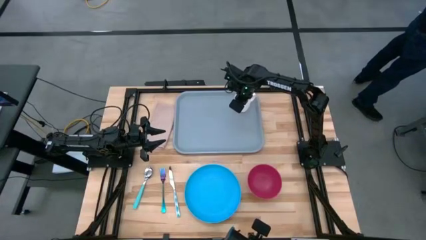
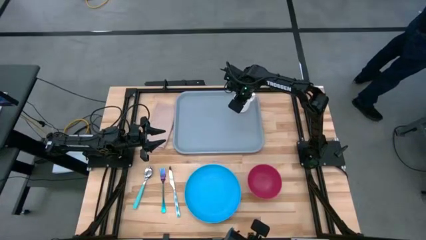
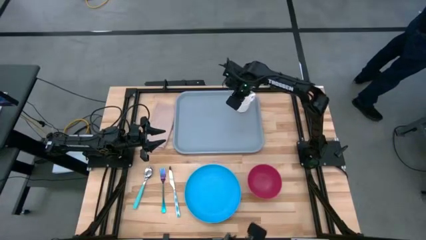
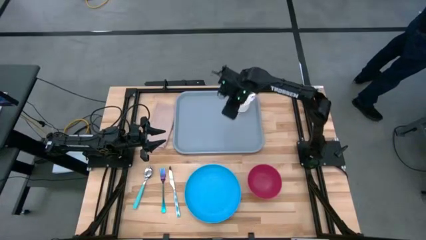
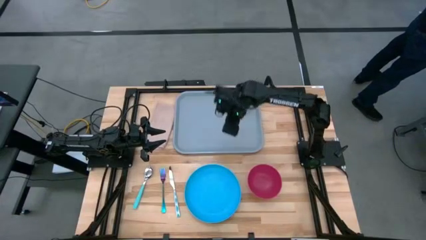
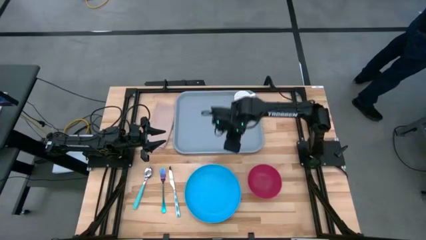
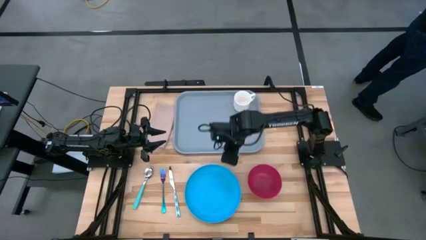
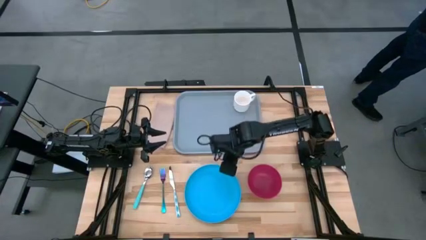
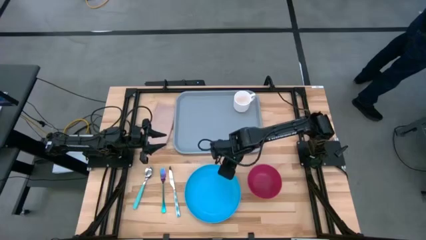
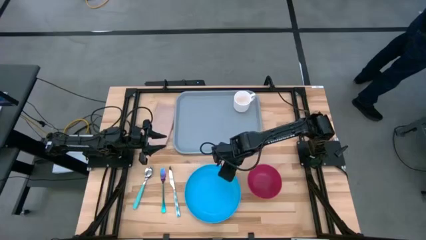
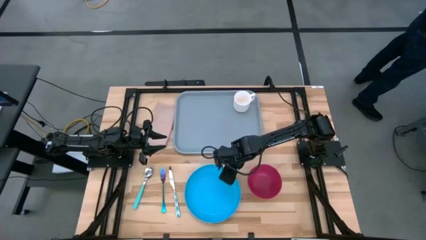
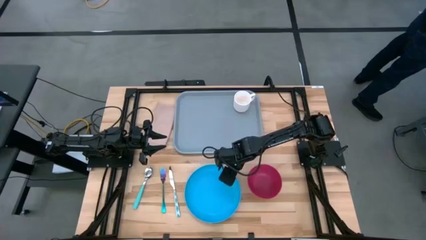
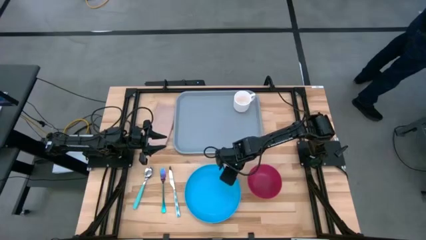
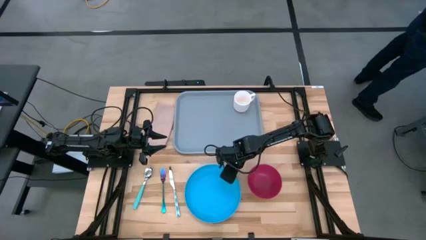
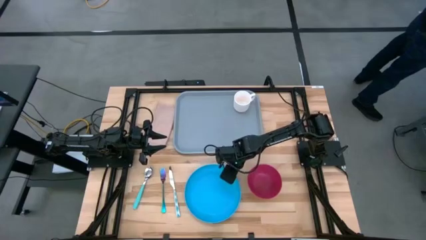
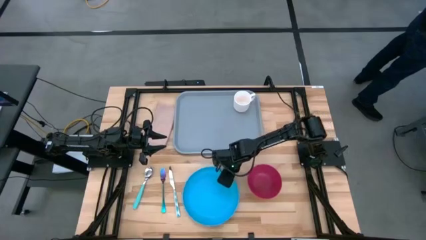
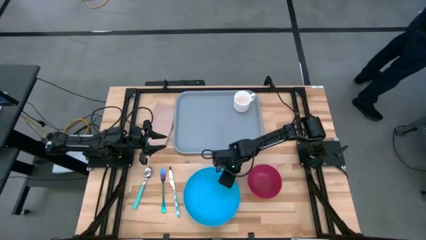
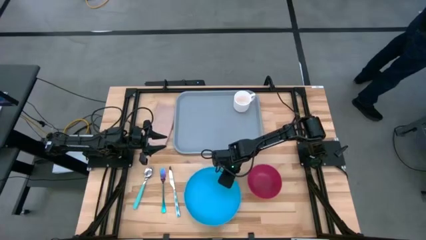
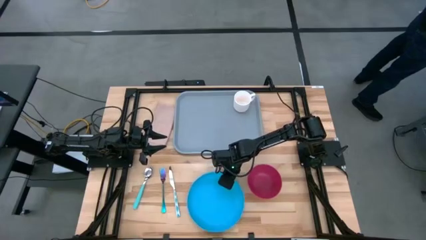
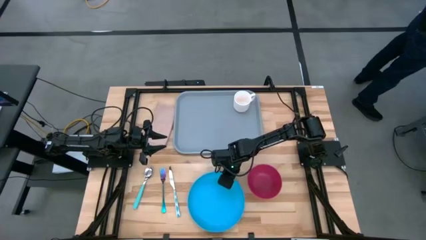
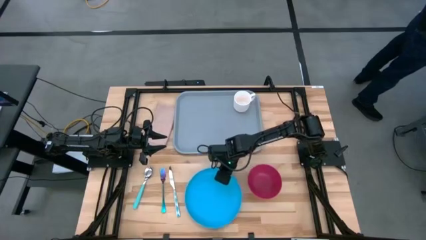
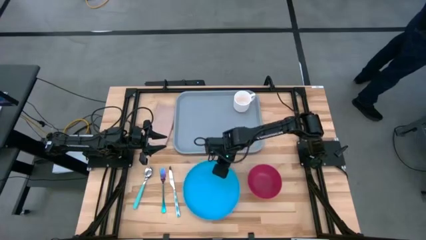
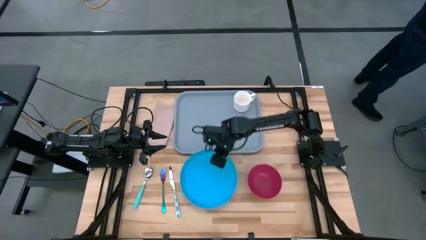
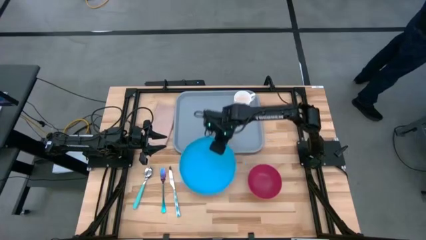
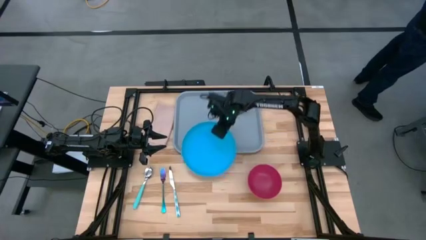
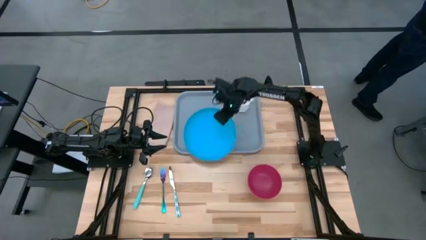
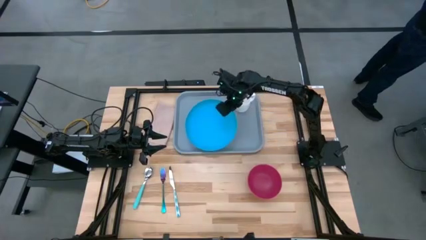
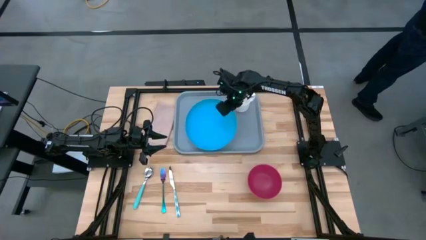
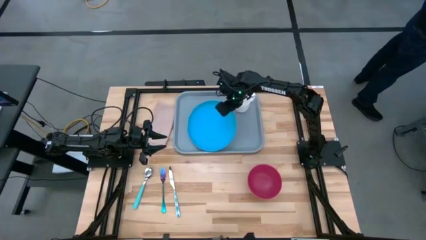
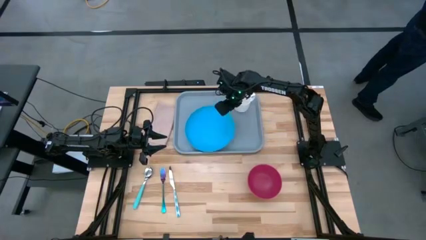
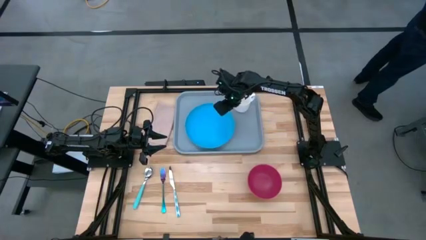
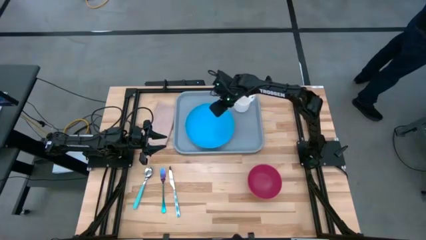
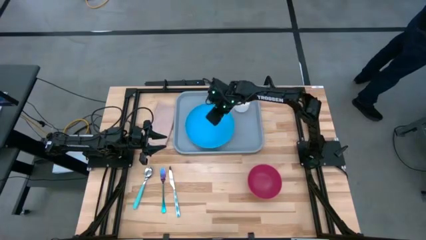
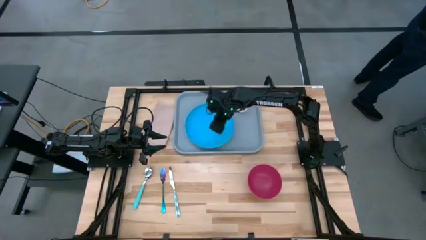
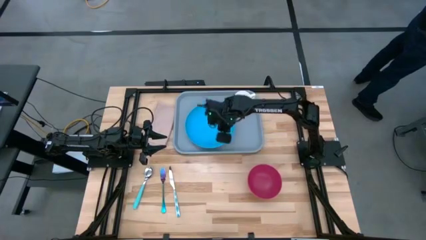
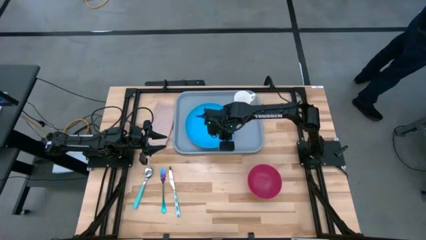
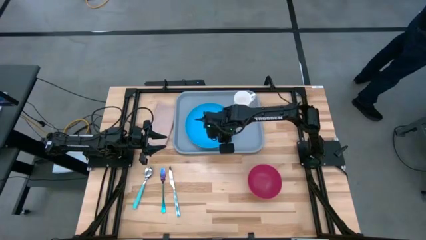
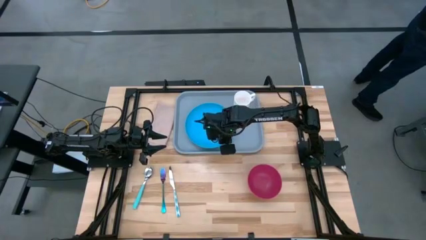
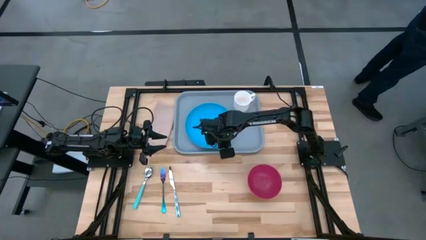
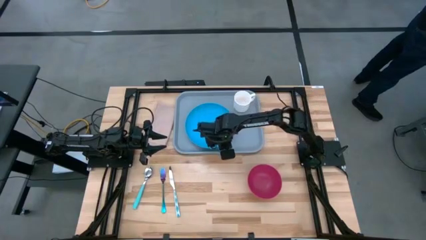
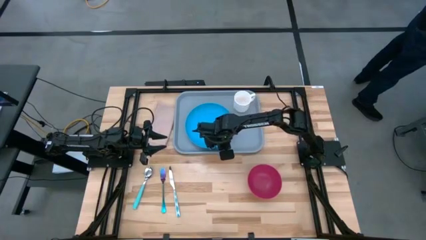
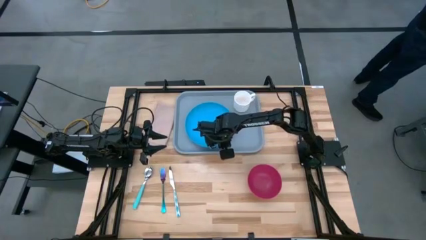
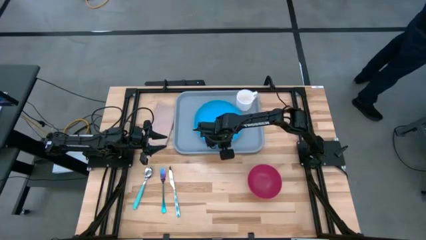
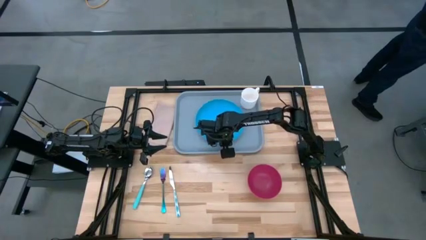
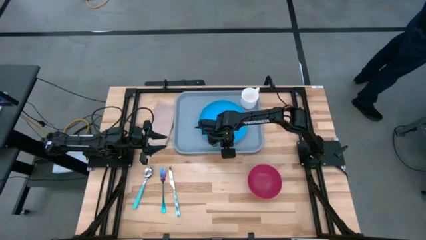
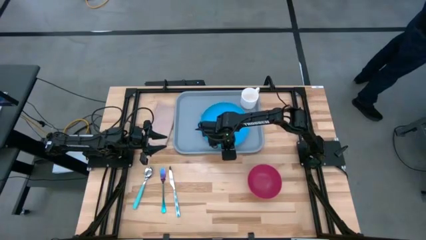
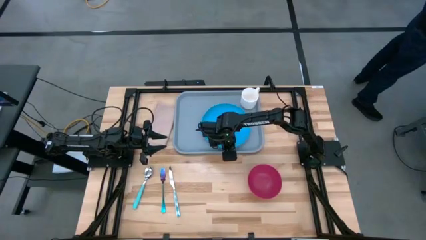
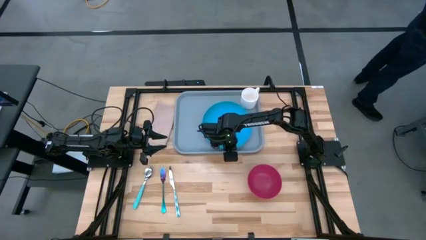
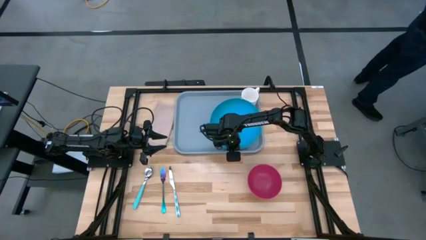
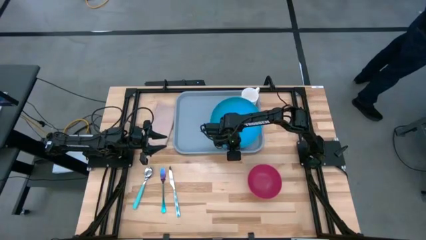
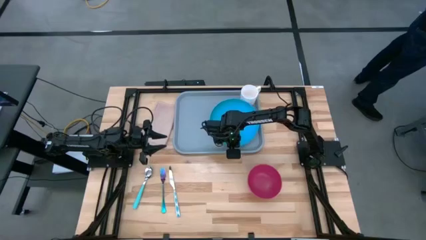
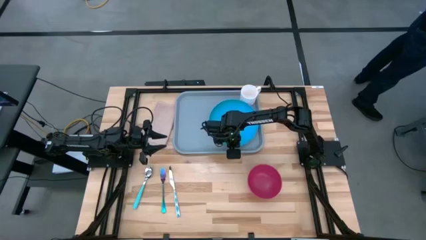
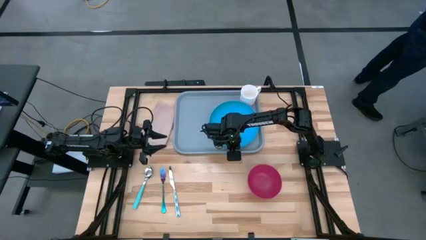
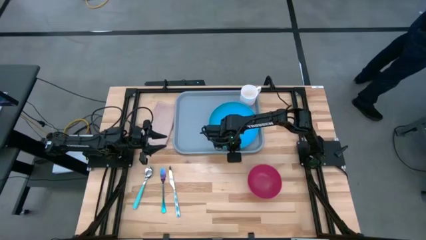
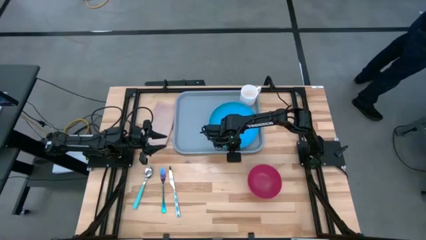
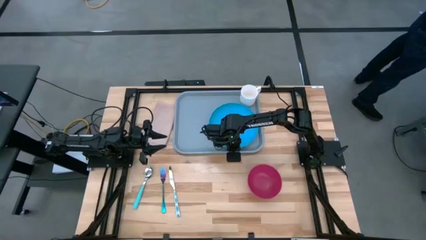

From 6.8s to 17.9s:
Task: Set up tray
Put the plate on the serving tray to the bottom of the mug

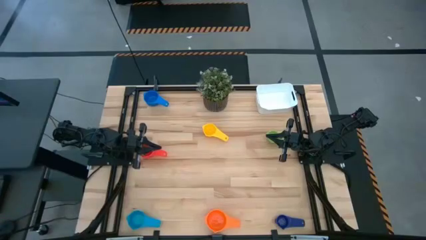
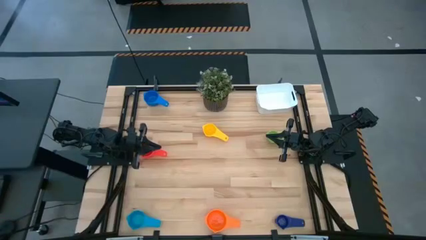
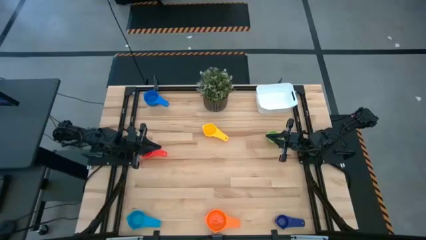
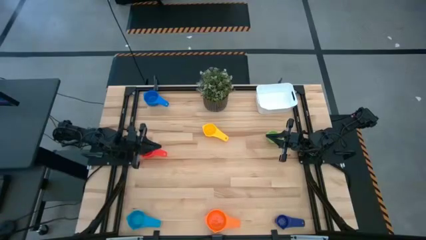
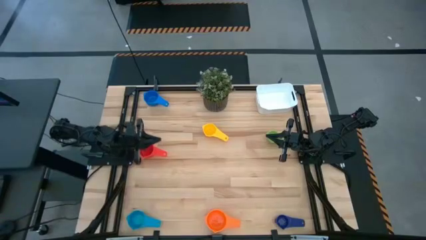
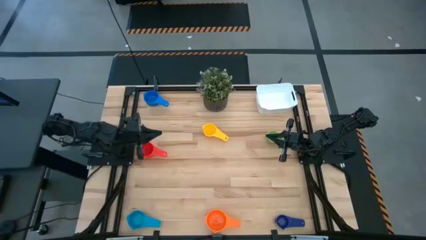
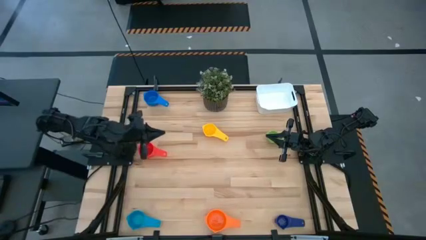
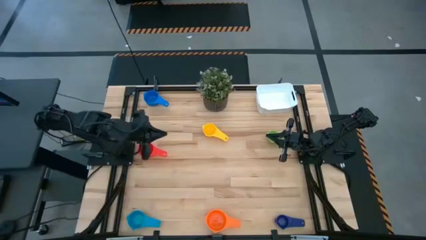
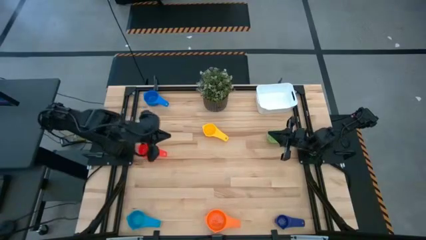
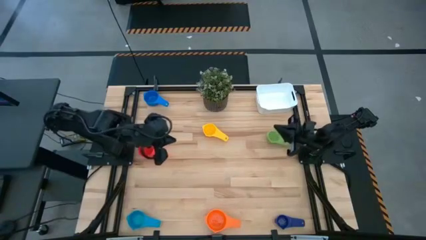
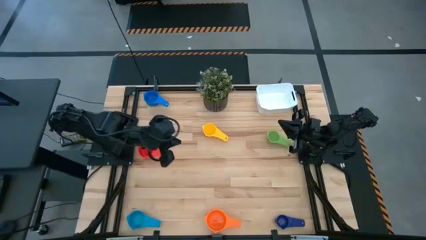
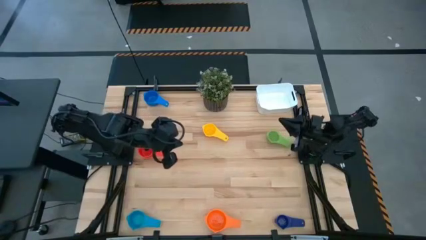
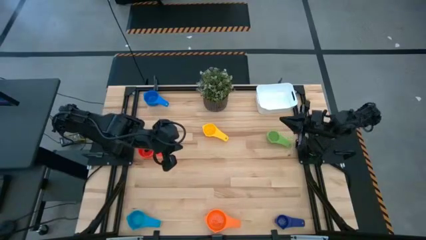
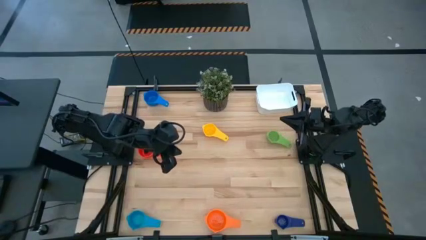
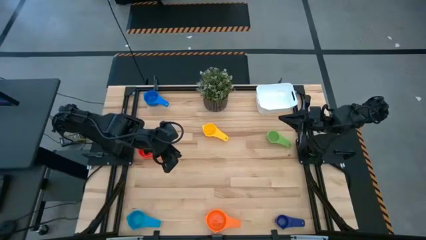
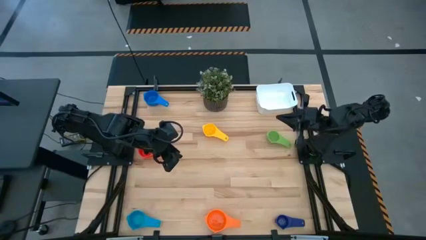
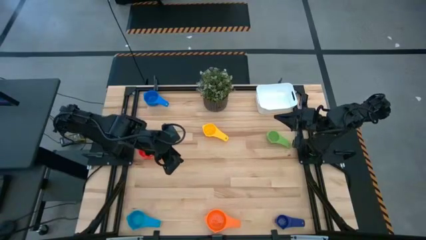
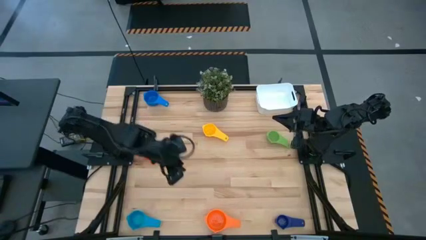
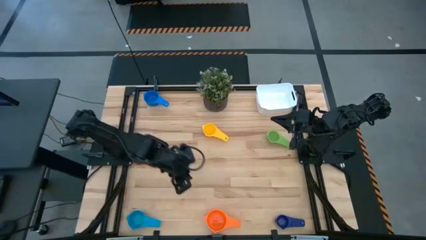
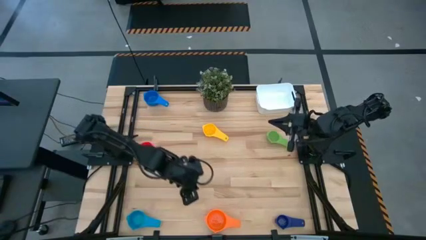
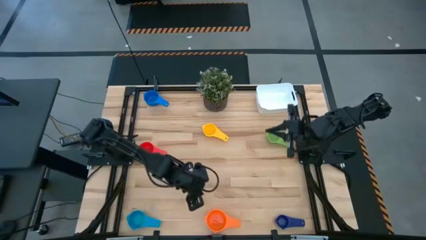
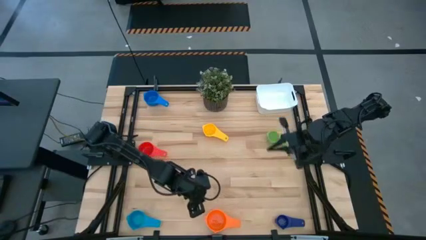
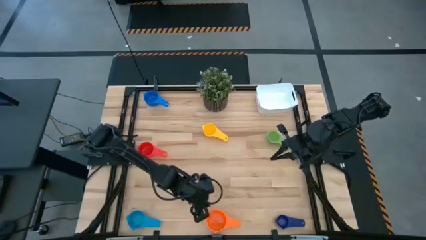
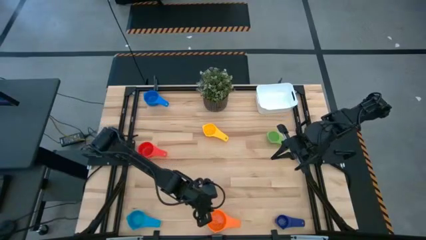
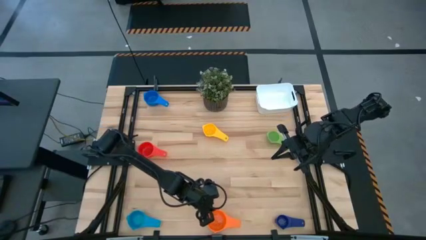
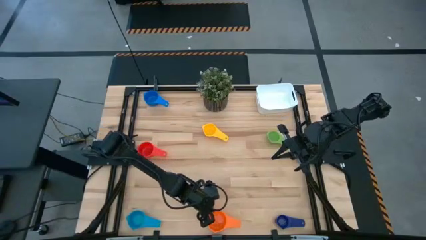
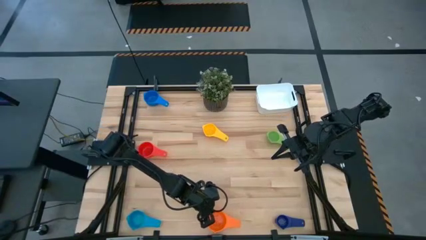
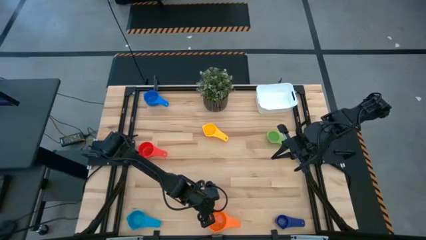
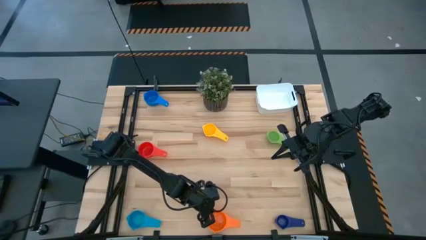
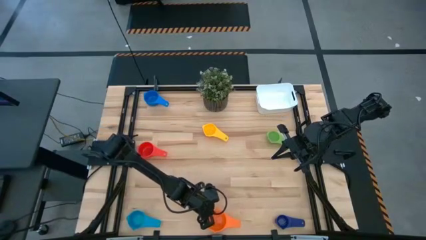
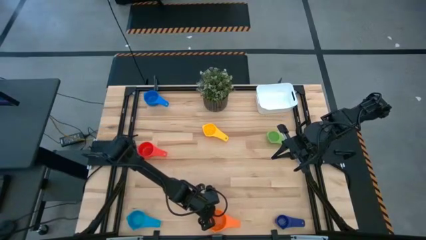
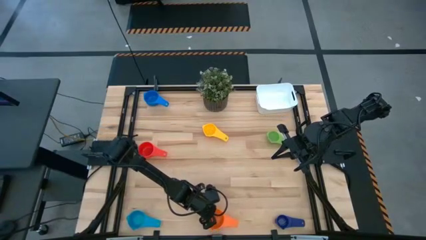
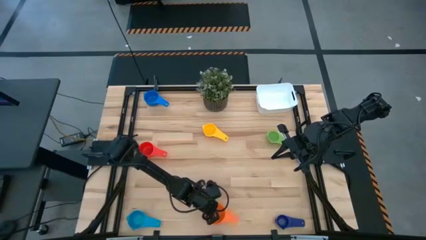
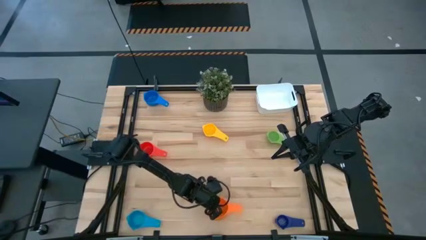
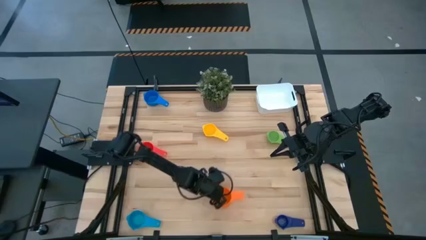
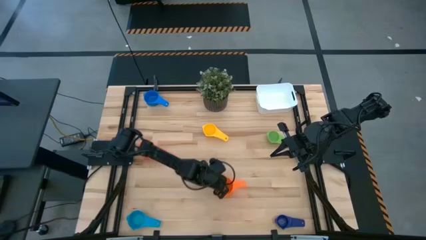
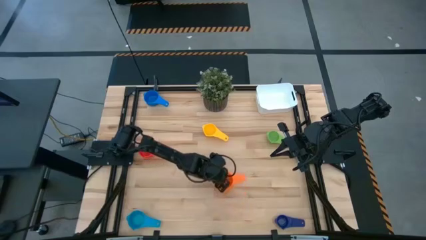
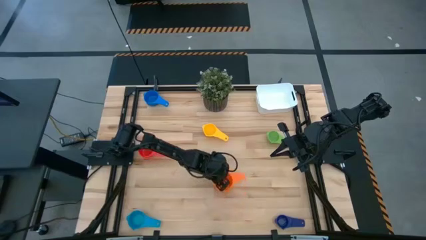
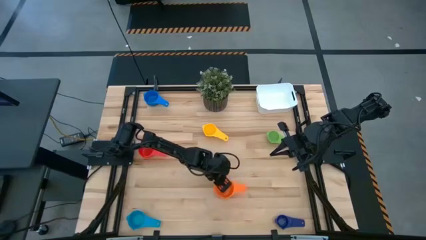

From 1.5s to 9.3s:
Task: Nest measuring cups in basket
Prepare the orange measuring cup
